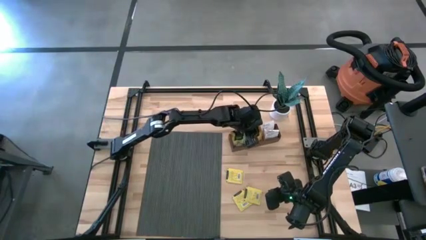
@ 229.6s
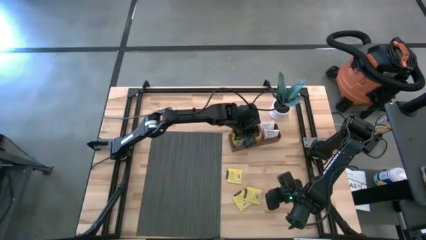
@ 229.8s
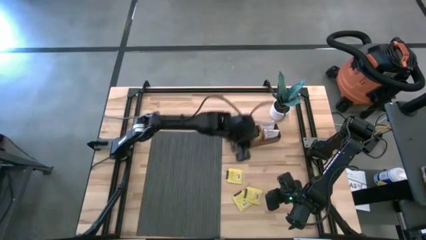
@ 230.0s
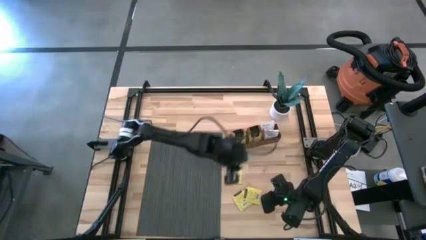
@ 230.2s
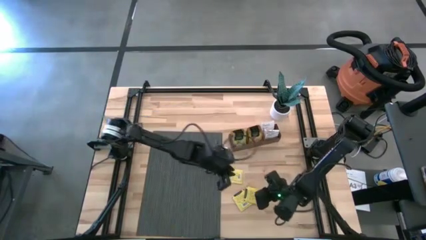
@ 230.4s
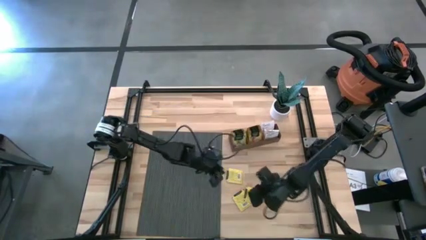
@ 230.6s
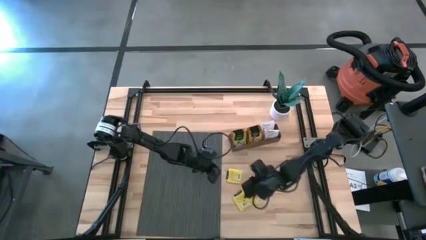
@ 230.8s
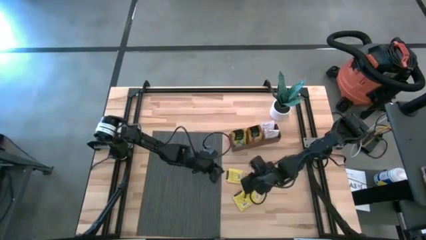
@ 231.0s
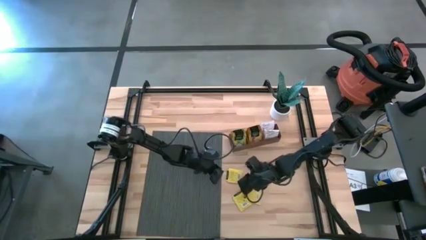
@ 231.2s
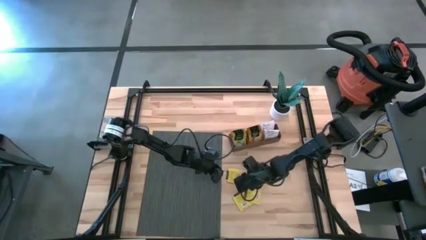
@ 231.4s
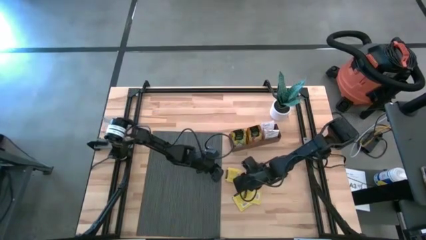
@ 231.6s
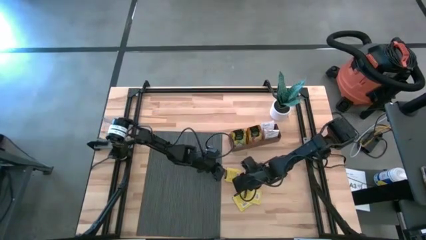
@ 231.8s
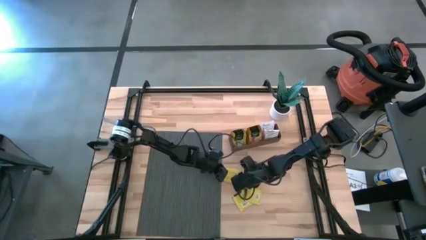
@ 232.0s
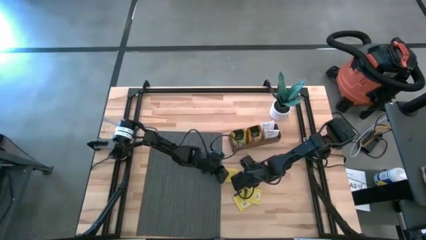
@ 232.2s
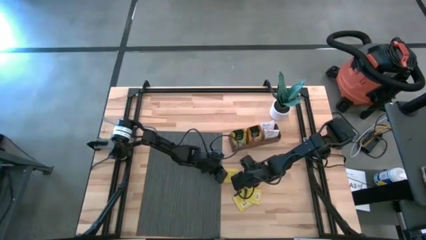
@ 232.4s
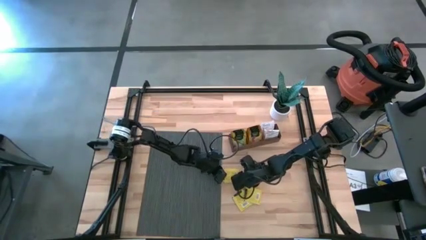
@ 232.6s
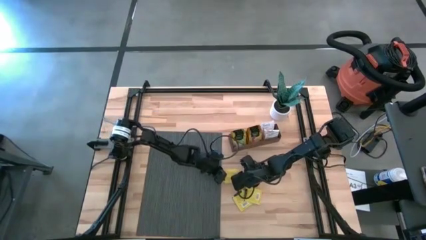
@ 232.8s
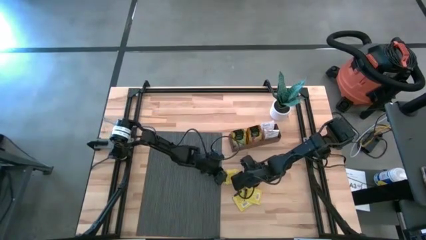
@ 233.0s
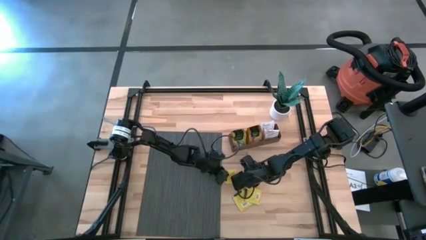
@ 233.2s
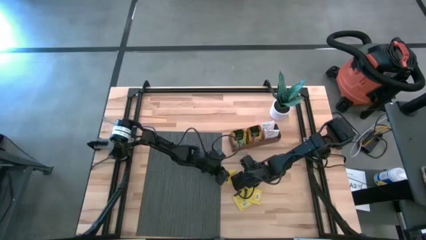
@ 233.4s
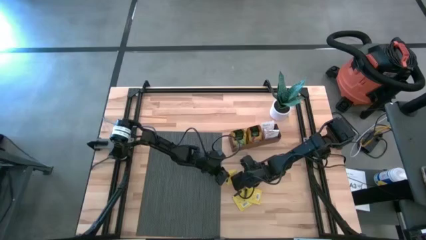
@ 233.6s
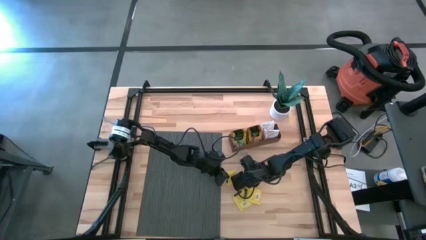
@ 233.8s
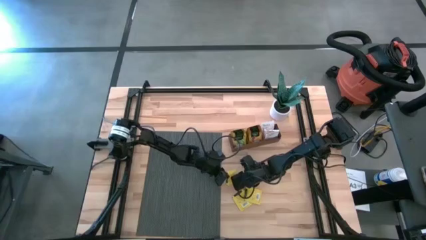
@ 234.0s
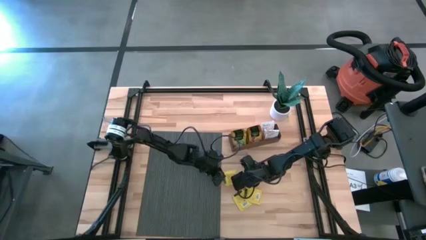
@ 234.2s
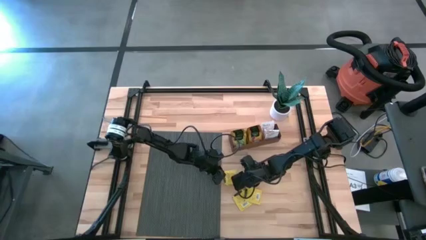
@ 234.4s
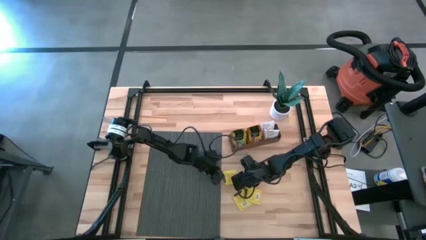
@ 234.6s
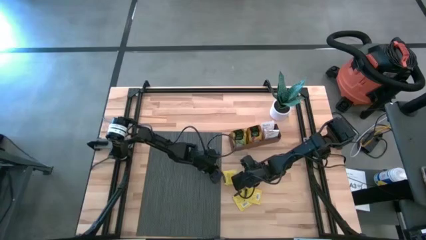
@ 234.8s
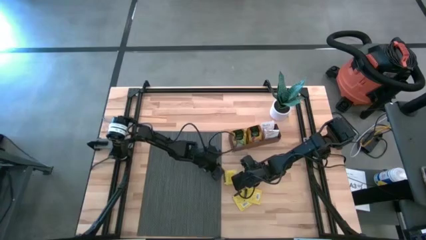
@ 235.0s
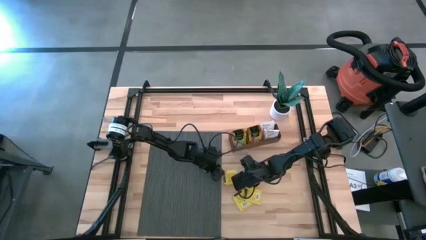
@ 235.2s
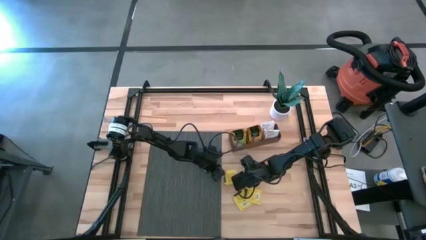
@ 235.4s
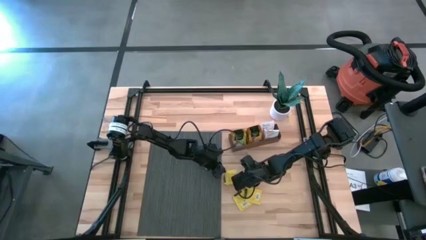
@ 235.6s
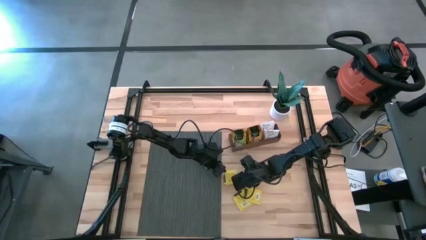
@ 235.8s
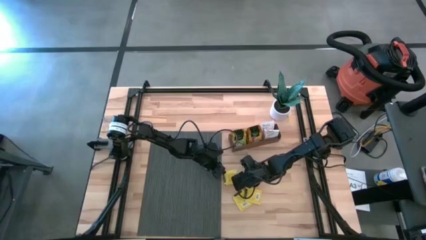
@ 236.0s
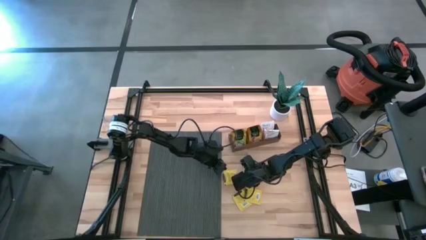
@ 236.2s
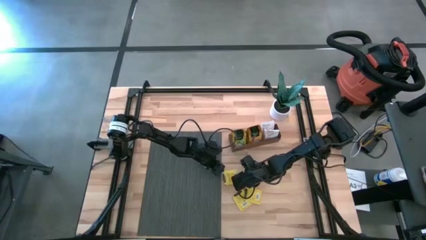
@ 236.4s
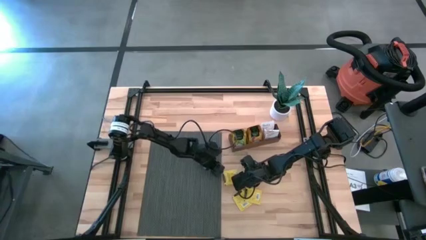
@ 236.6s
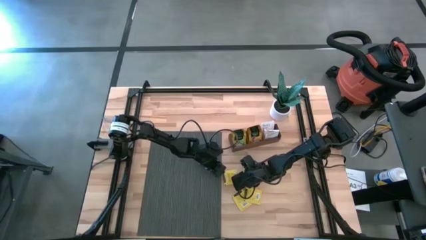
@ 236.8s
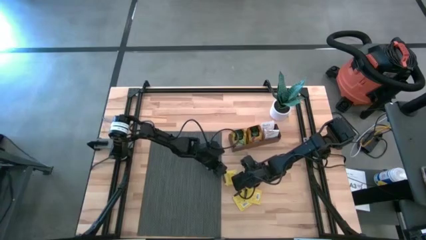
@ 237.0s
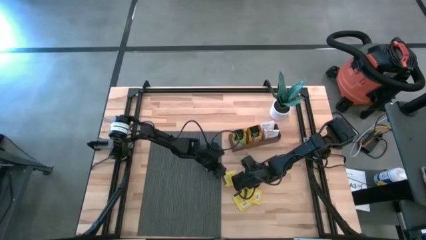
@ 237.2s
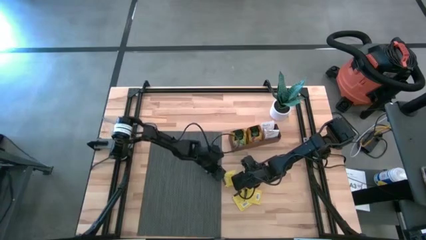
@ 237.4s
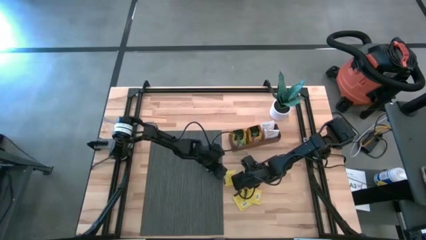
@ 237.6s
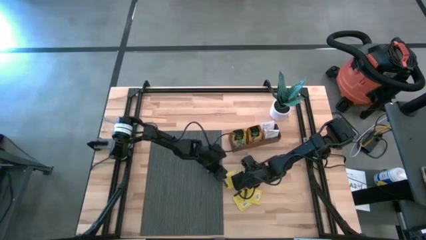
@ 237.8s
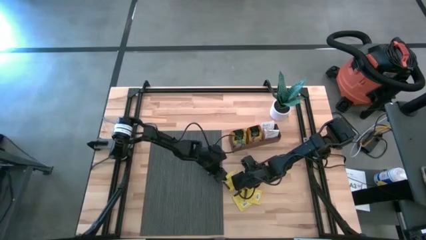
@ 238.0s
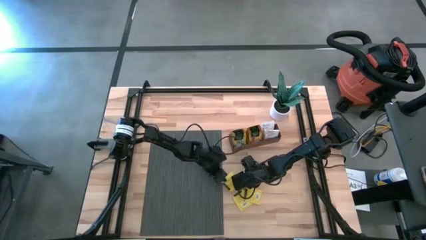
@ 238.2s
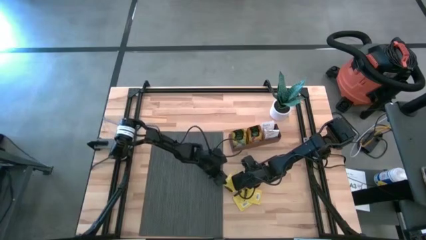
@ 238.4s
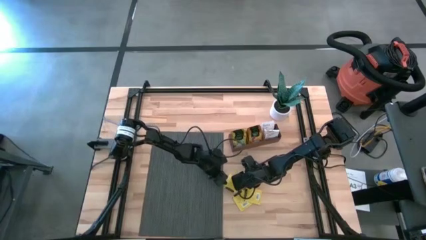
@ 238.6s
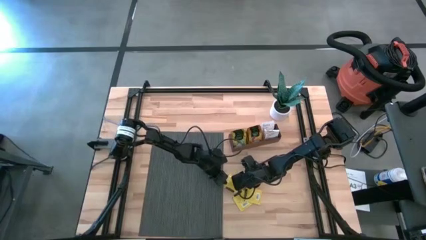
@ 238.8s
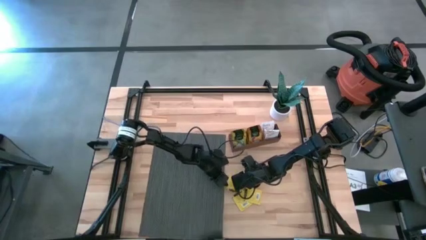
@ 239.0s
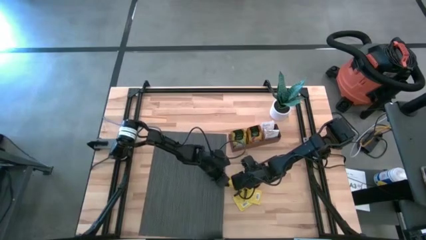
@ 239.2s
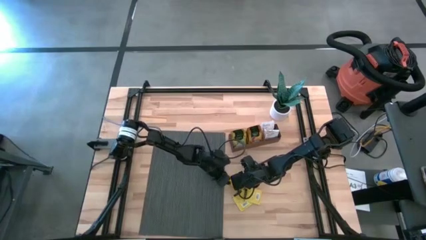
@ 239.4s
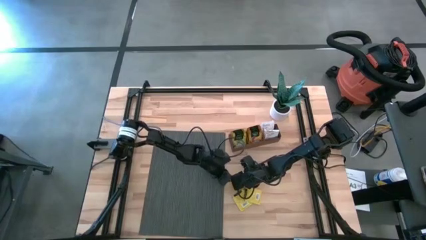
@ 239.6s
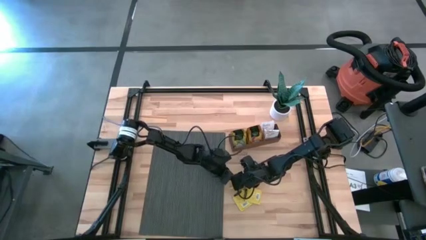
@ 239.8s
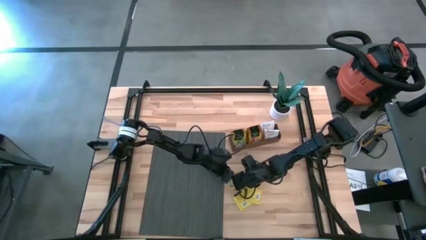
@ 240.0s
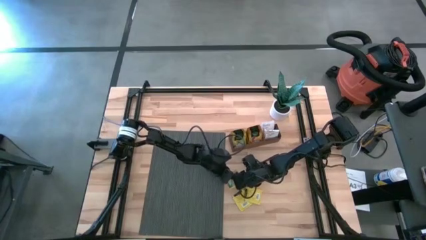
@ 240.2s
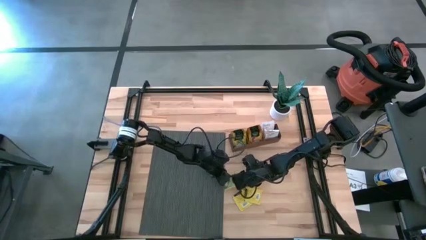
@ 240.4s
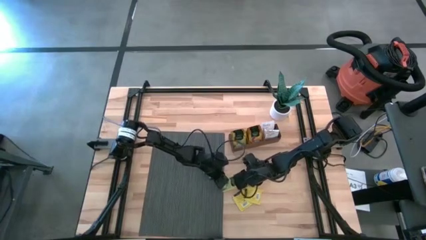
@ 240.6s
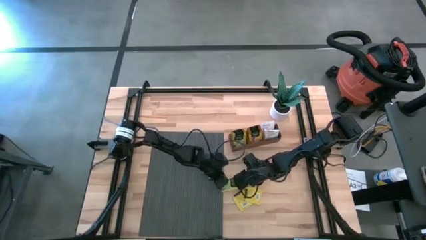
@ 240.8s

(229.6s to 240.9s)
Task: Pick & Place Tea
Put the yellow tea bag into the middle section of the wooden organizer

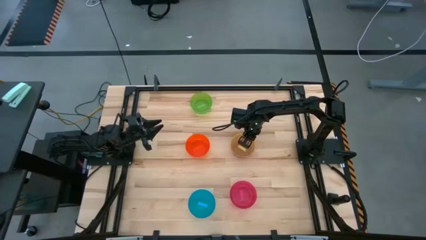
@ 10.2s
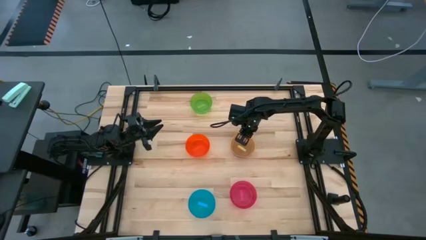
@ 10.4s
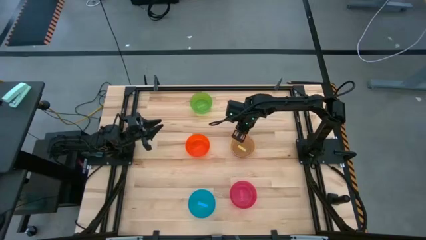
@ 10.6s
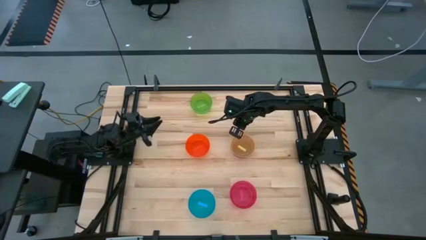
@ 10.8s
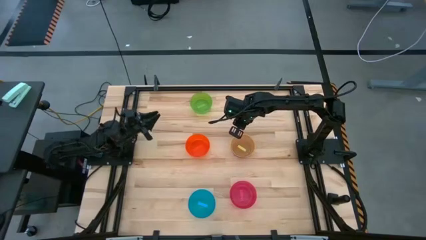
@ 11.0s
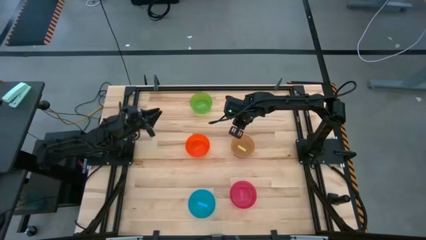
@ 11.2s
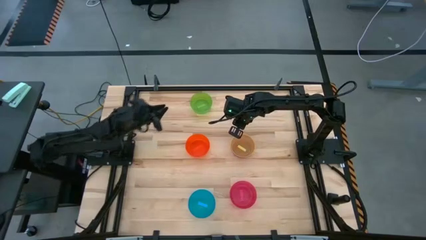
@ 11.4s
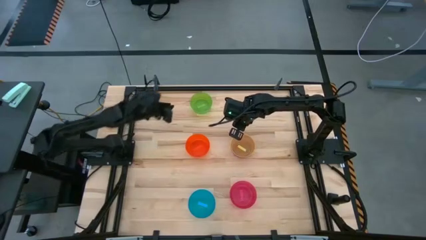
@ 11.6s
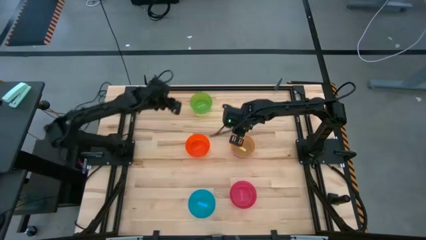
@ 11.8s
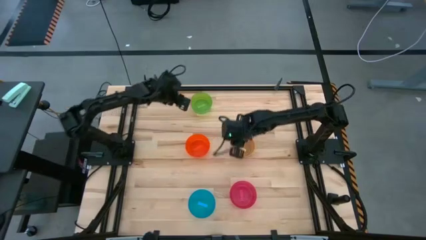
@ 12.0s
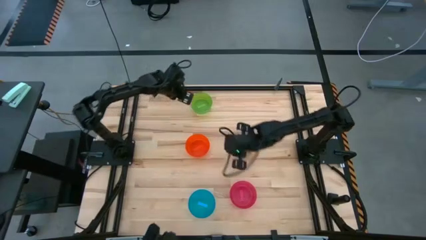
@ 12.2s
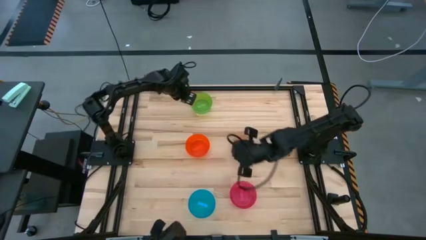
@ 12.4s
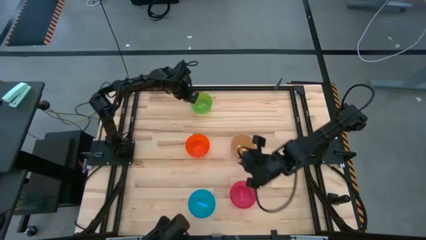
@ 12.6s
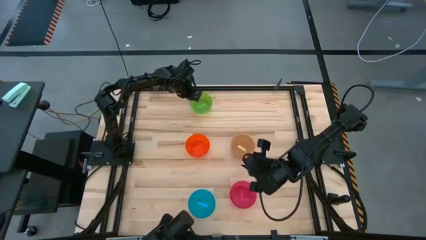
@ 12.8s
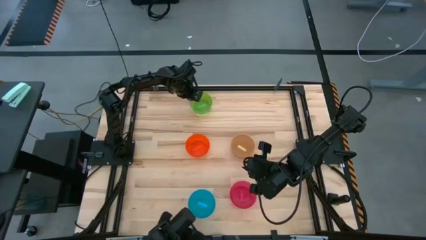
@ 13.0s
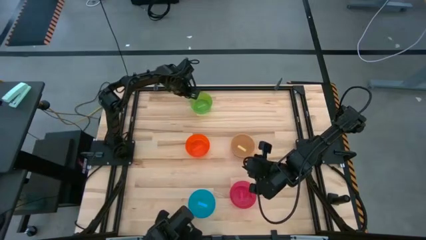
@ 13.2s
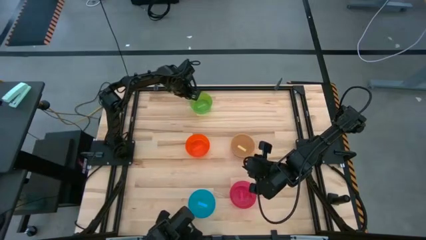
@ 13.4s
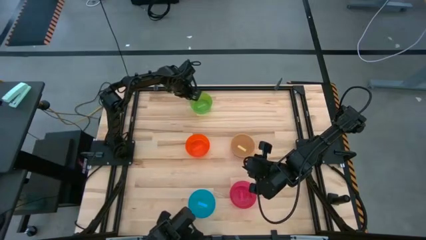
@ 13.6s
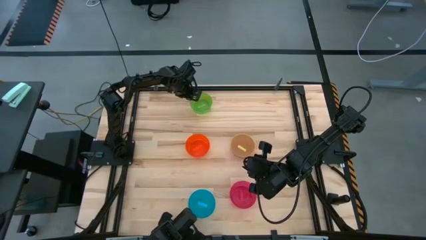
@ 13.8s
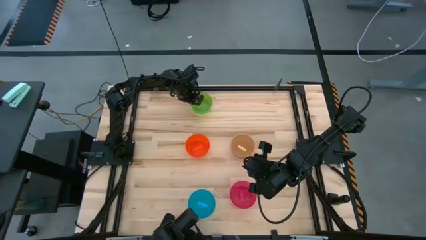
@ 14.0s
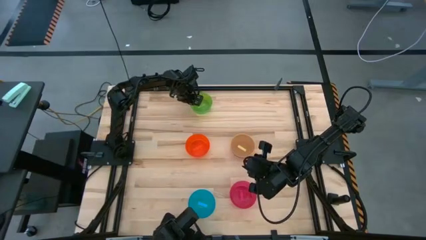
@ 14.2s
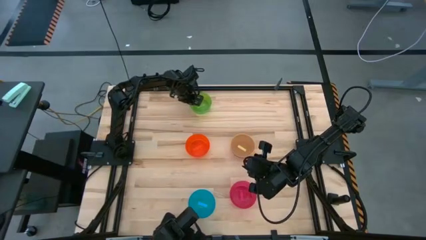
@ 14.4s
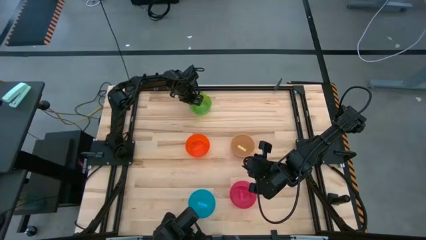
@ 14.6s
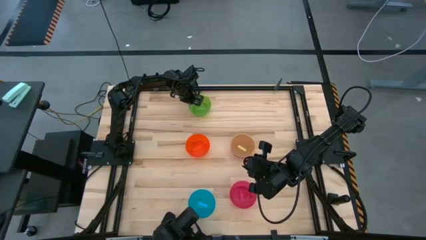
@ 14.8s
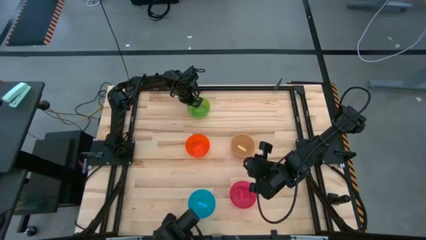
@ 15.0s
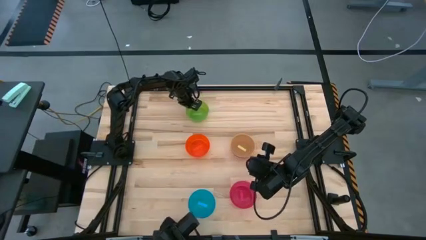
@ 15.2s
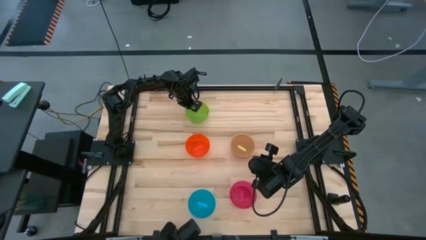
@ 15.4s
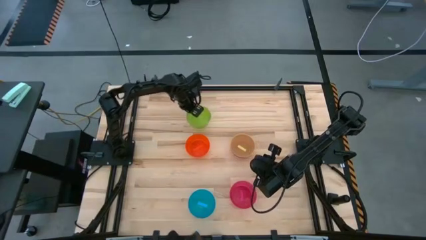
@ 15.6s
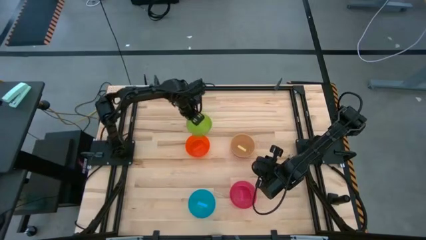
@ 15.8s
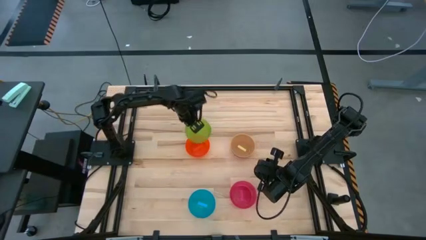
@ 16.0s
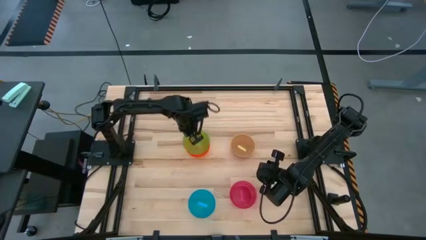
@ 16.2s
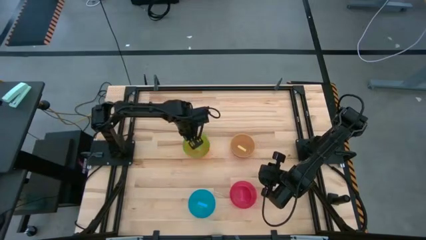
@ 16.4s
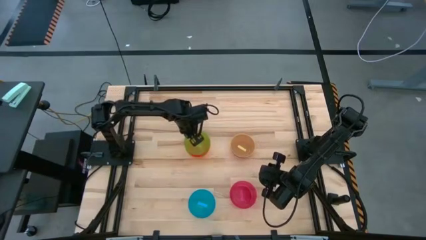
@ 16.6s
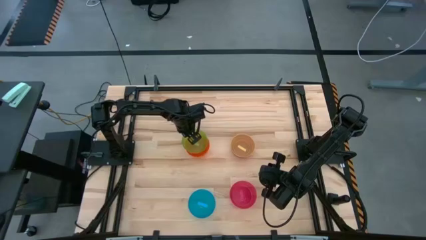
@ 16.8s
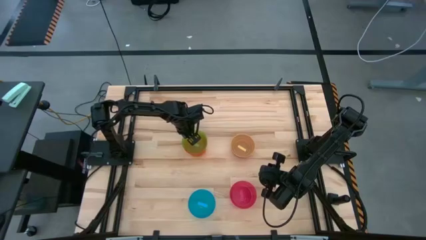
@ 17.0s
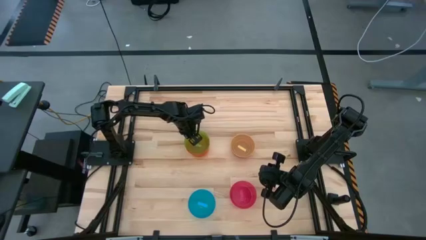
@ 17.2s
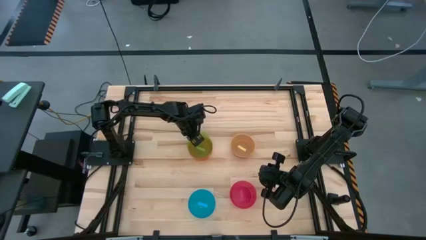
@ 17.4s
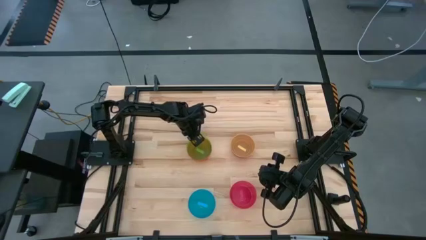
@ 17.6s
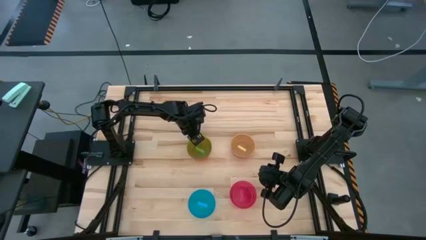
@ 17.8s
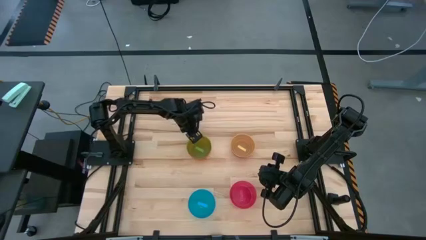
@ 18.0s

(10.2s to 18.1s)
Task: Nest bowls inside each other
Stack the green bowl on the orange bowl
